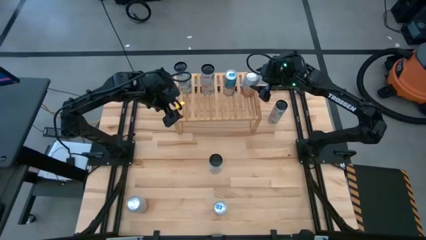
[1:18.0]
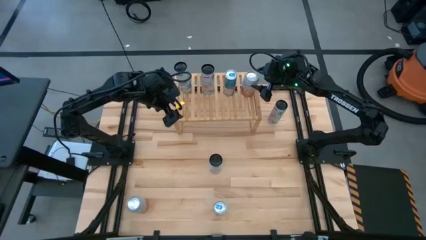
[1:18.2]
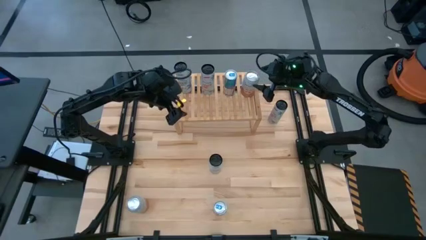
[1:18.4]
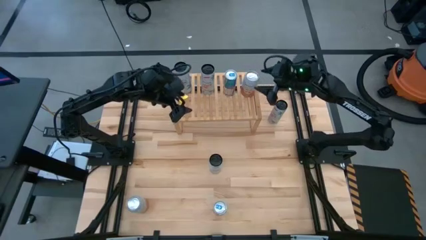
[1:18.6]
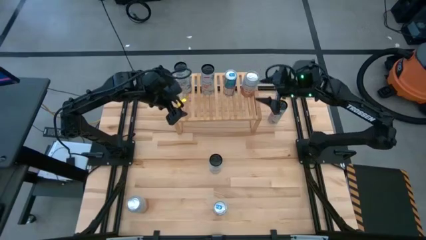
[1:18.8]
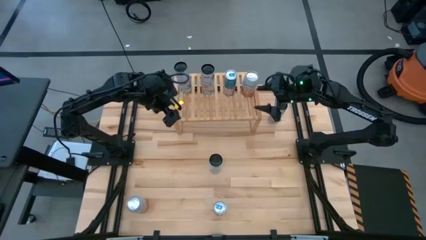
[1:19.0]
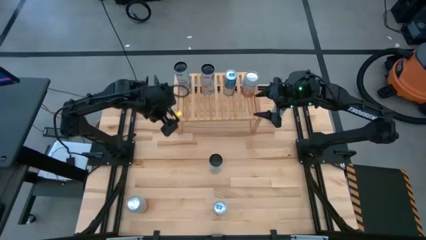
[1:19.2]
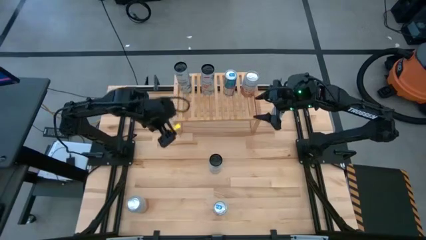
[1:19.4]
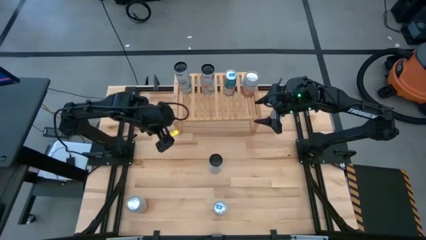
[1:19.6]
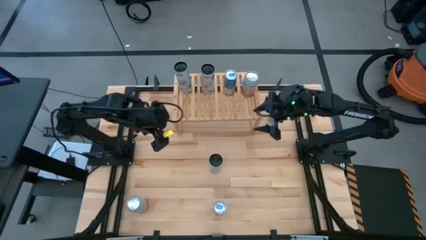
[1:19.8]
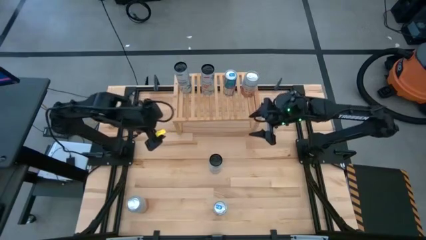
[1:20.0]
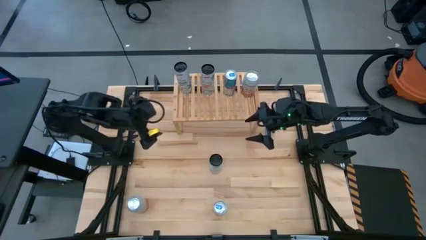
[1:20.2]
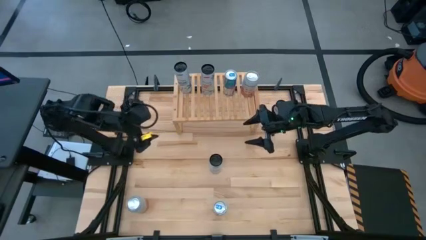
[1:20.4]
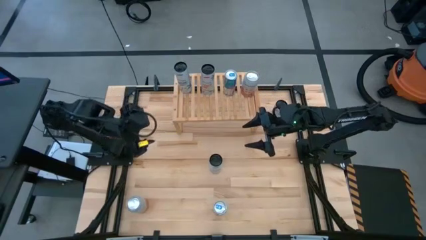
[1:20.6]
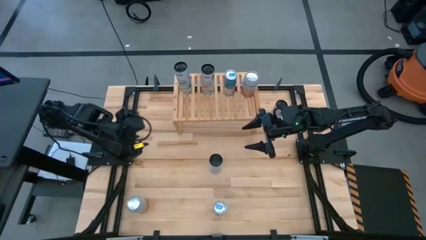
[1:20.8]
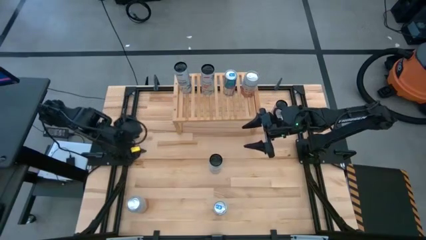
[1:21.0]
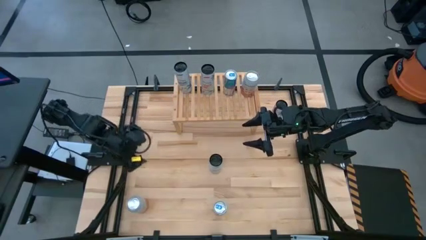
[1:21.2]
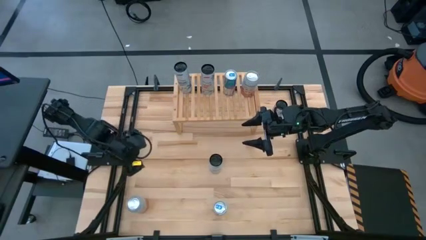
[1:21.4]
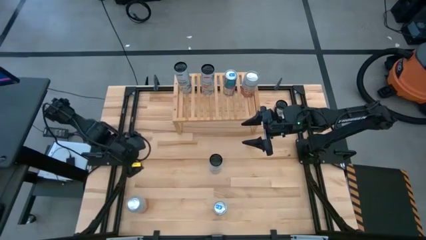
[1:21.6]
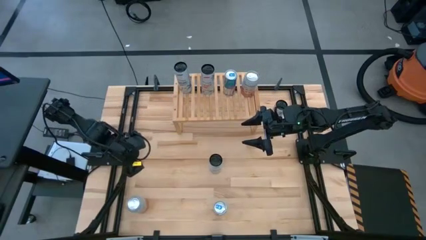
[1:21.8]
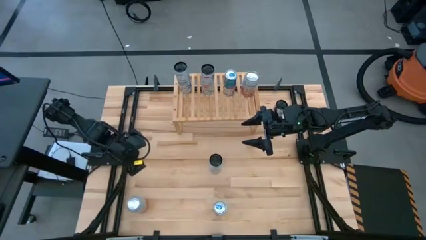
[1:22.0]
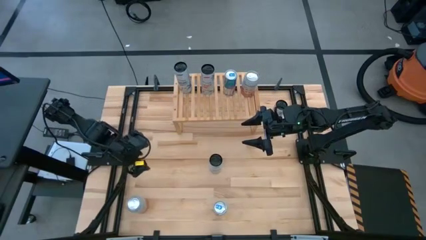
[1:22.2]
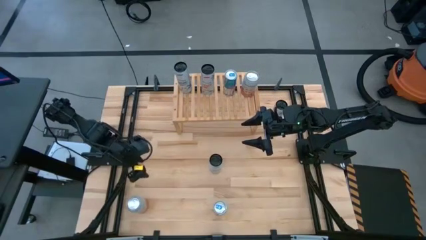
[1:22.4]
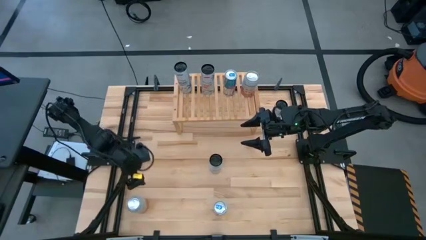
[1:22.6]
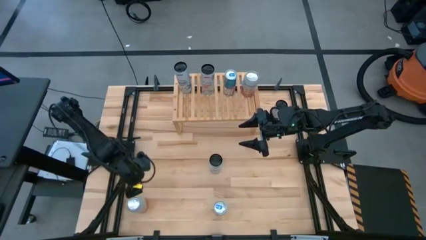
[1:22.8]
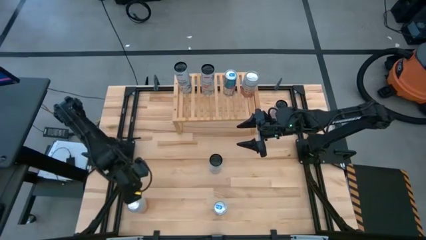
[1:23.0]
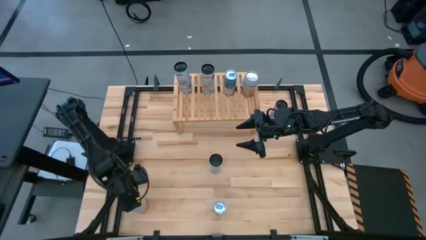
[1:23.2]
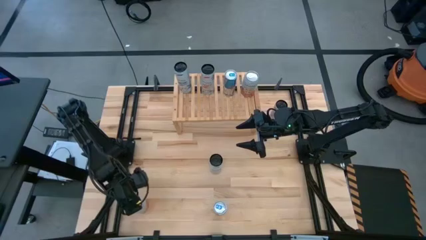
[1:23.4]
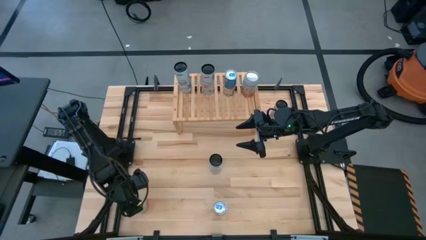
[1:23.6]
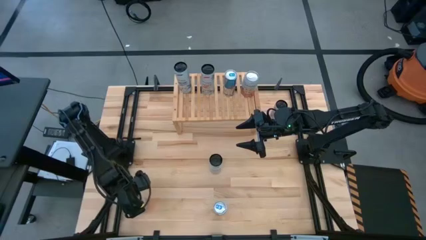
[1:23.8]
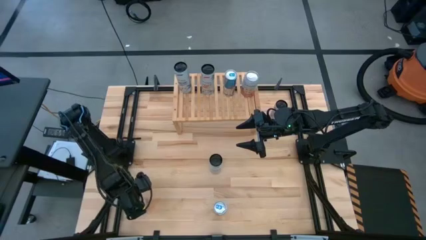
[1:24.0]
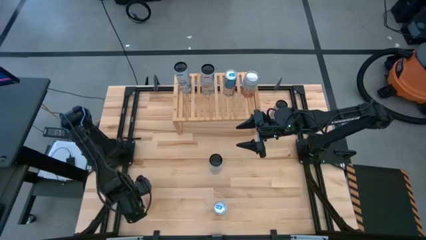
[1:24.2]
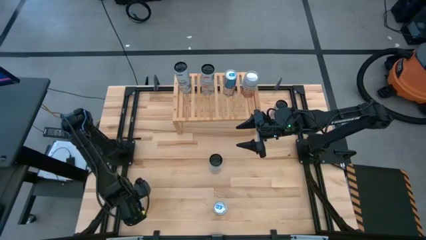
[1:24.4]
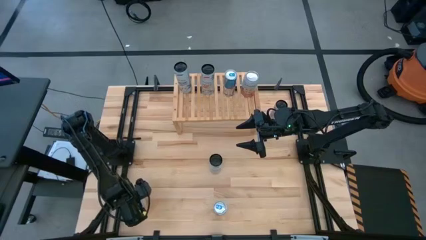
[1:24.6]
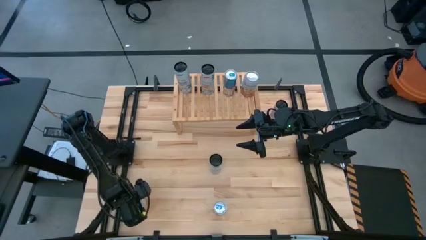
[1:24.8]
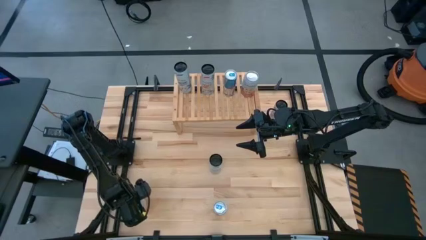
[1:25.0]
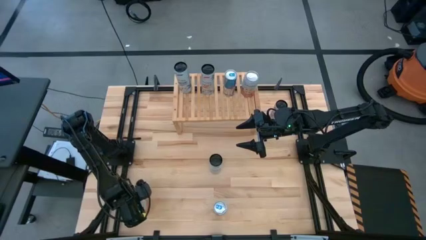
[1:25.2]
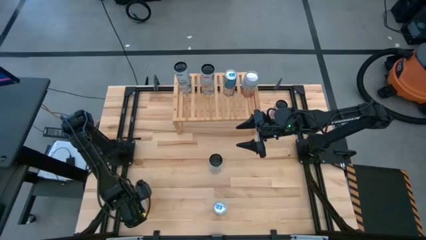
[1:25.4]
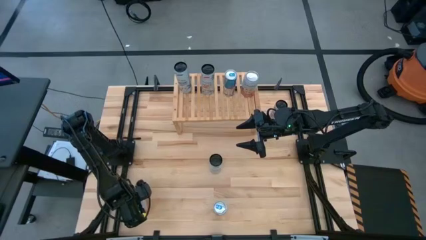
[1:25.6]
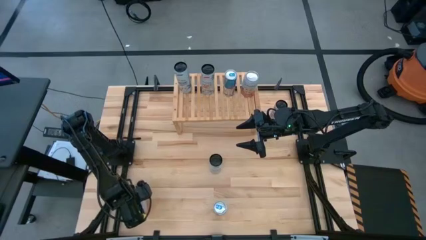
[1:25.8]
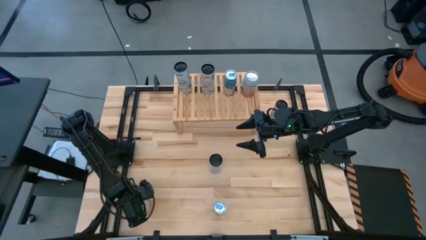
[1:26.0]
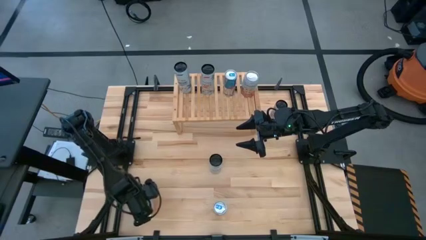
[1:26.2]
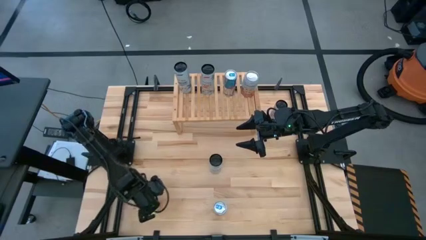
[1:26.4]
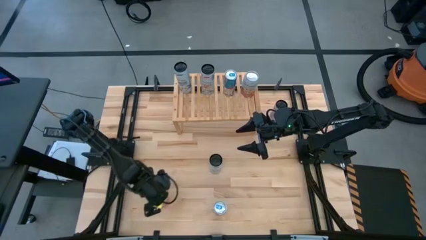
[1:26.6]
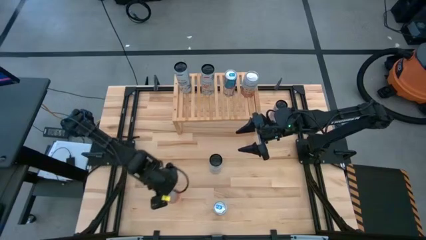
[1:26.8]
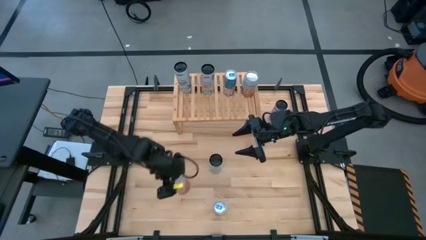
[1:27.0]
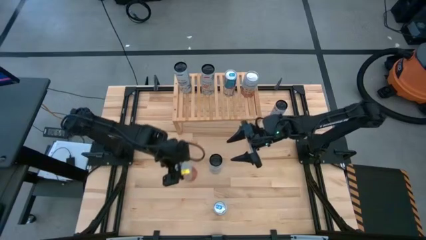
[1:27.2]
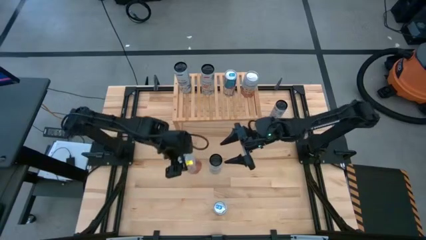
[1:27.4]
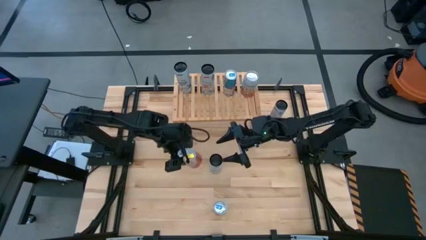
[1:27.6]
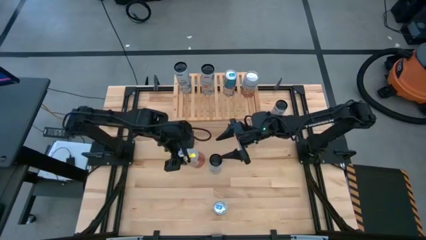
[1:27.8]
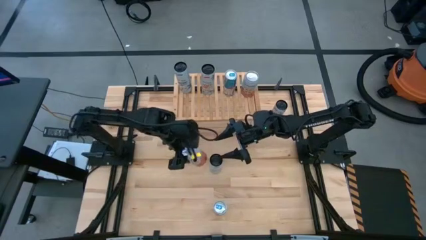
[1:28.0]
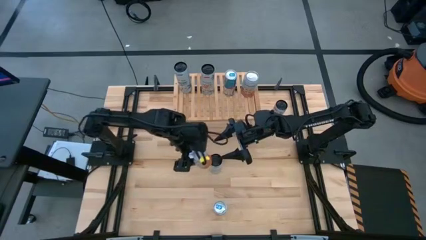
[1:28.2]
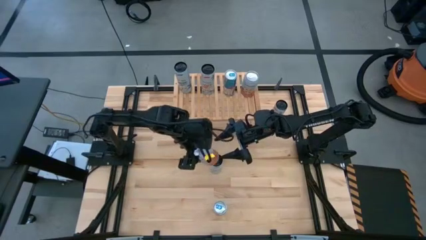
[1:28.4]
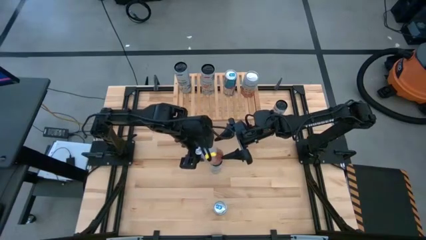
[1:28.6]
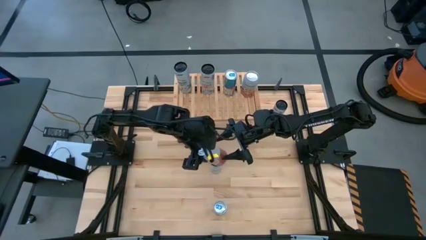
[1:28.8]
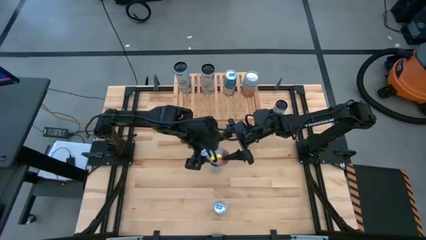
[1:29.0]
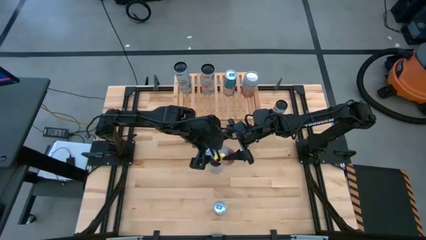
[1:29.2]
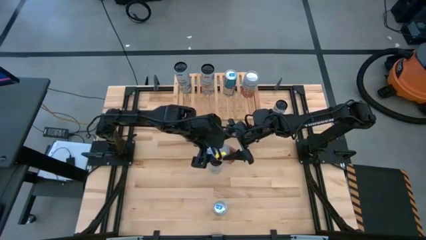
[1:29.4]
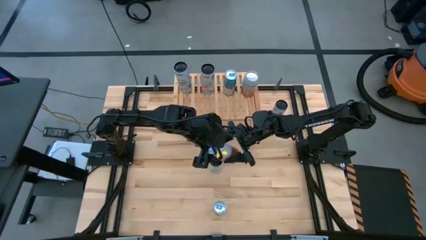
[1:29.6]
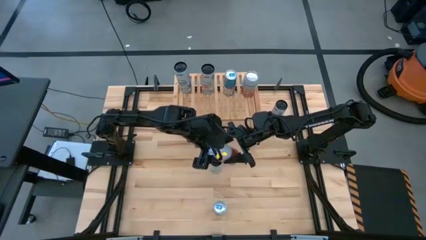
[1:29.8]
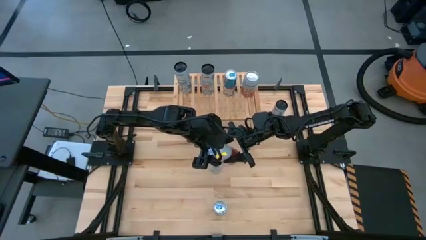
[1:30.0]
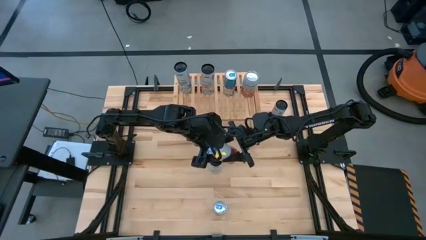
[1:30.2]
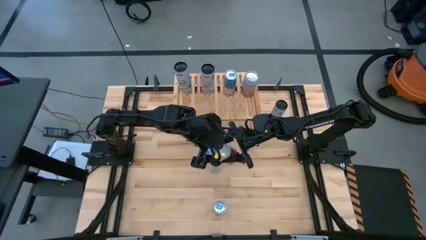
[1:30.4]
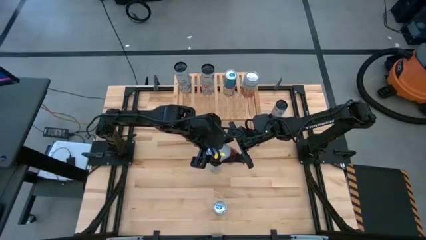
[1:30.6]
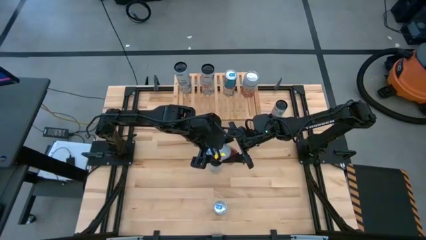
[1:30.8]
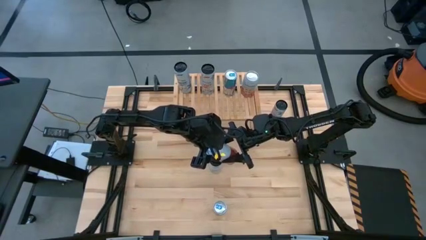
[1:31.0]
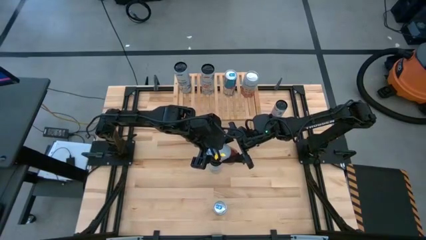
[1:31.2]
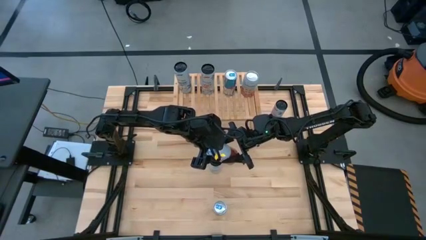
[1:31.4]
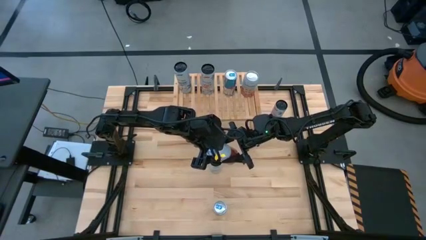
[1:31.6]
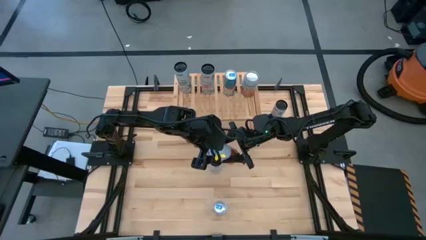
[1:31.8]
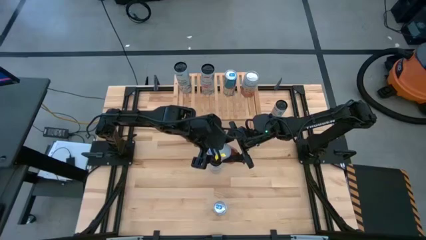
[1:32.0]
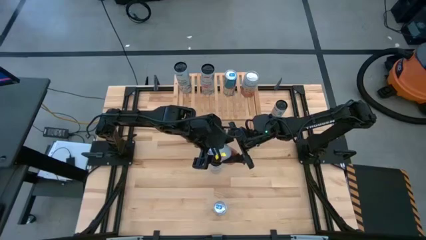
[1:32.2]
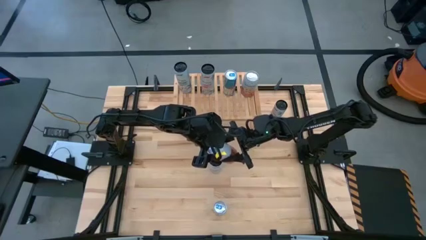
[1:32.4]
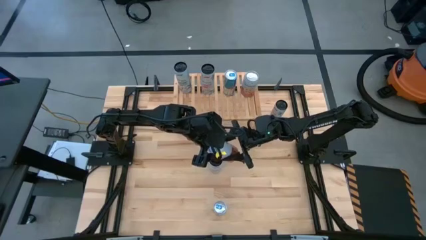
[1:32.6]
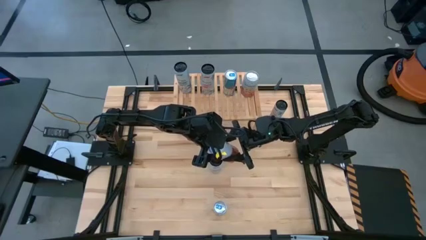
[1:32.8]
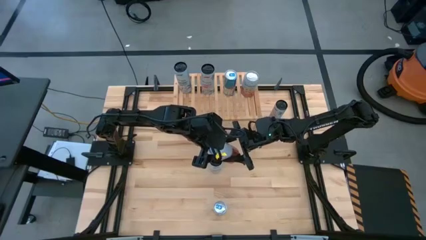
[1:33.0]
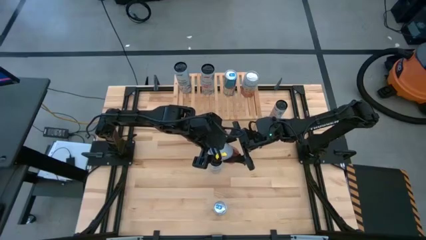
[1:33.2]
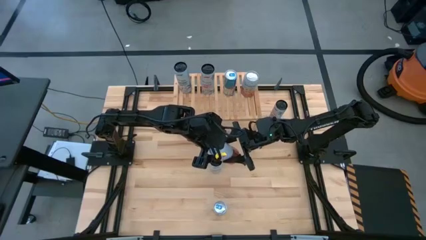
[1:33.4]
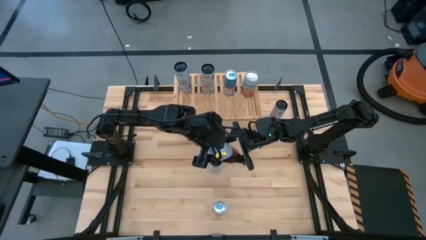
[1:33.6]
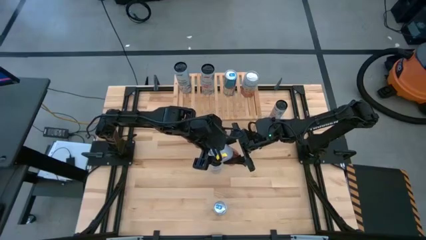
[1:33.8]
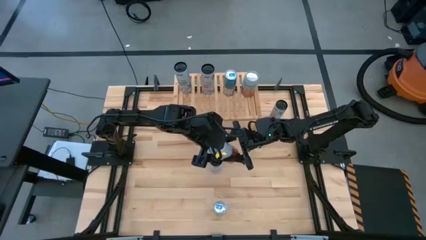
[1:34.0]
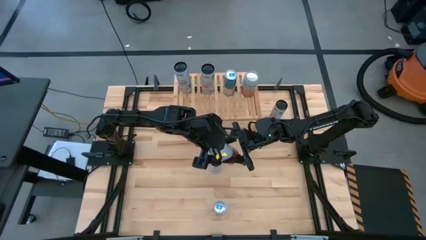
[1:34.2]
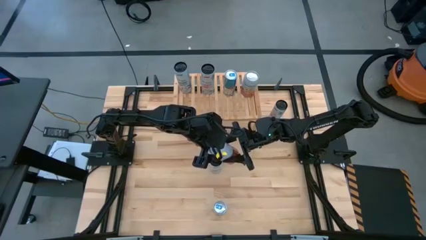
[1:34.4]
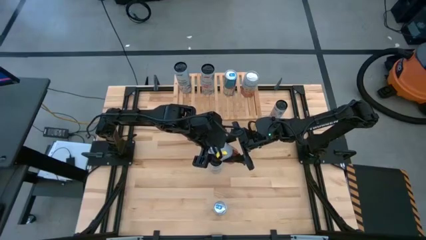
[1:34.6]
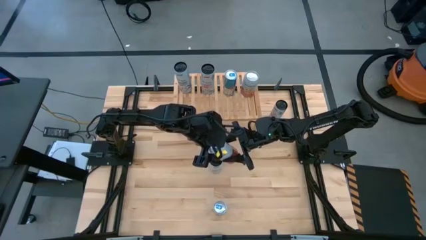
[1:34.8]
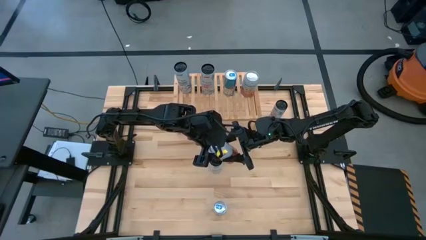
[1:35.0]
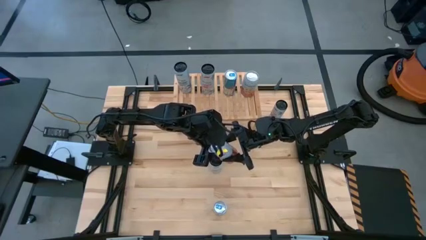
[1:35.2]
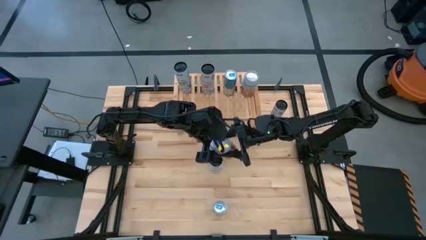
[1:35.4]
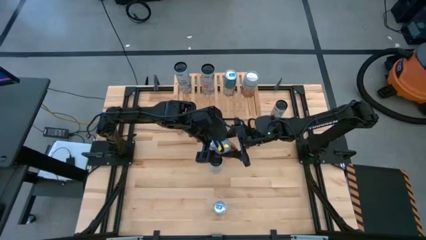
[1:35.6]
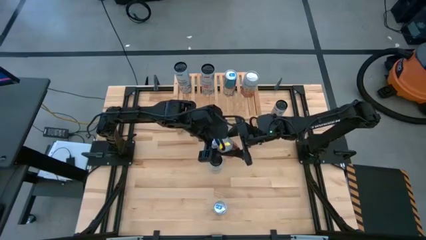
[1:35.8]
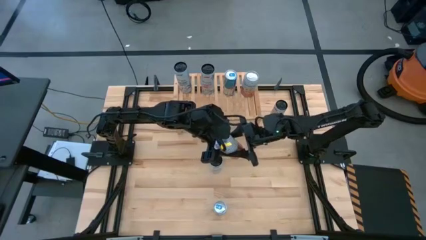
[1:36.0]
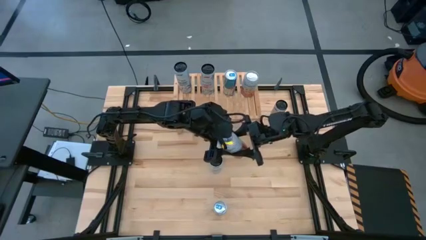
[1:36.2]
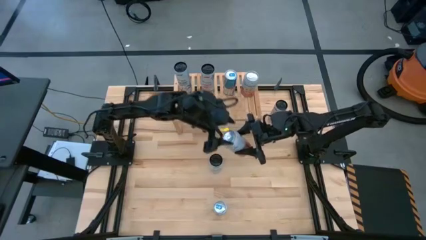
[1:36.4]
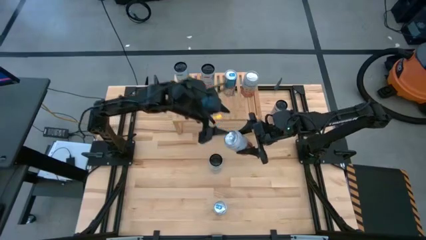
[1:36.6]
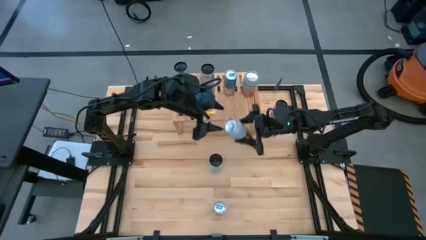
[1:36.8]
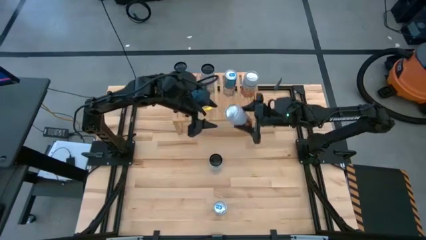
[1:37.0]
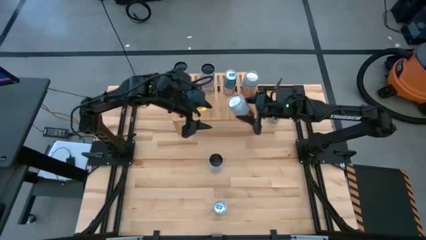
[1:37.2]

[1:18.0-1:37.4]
Task: Place canned beverage on shelf
Put the pink-white soda can on the shelf aligned with the other pink-white soda can
